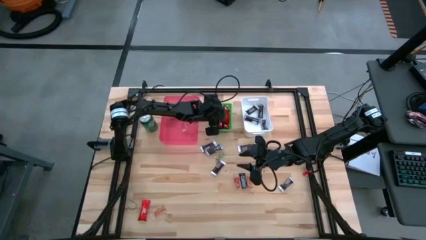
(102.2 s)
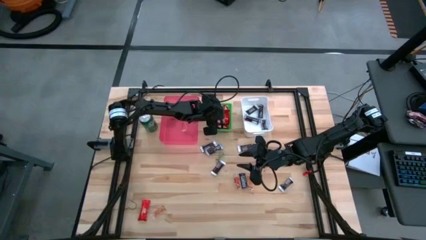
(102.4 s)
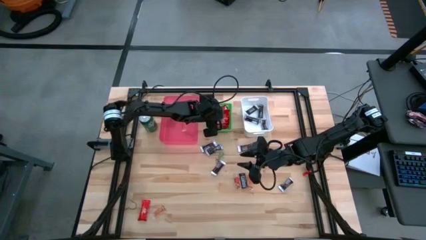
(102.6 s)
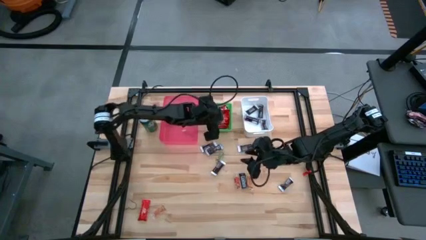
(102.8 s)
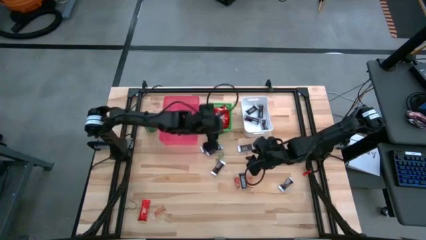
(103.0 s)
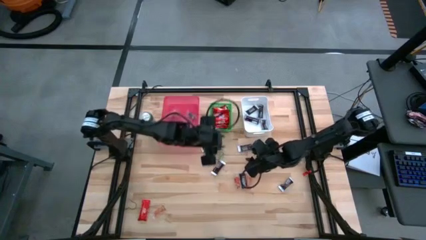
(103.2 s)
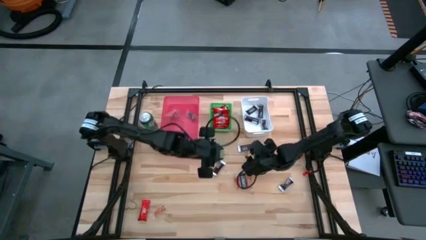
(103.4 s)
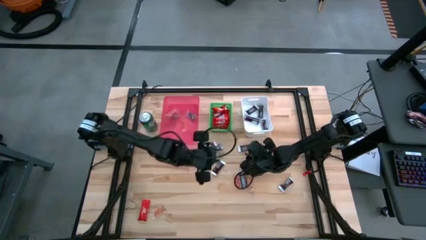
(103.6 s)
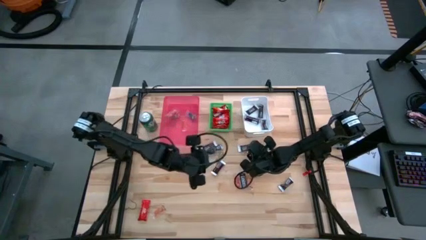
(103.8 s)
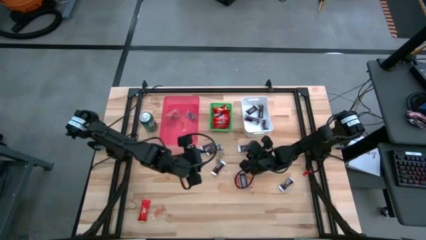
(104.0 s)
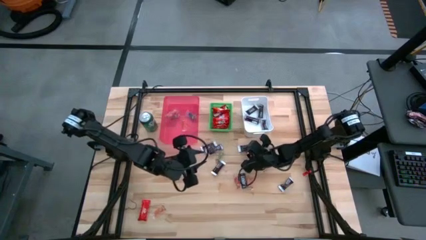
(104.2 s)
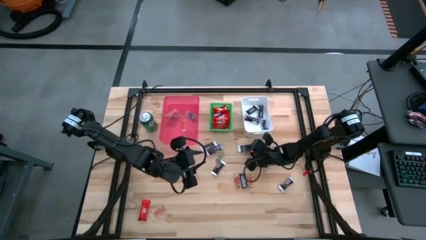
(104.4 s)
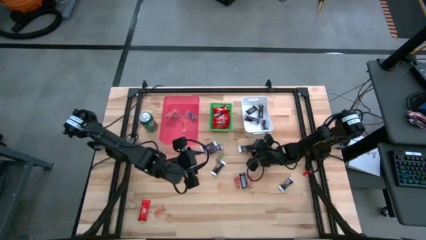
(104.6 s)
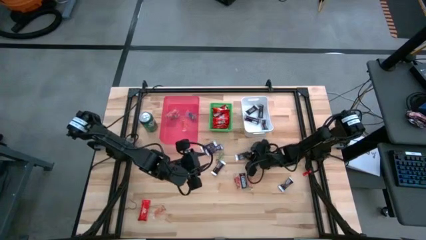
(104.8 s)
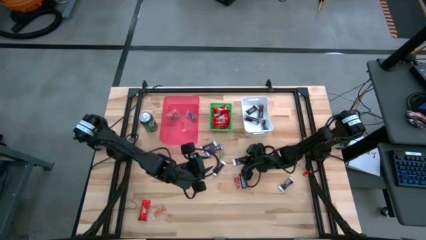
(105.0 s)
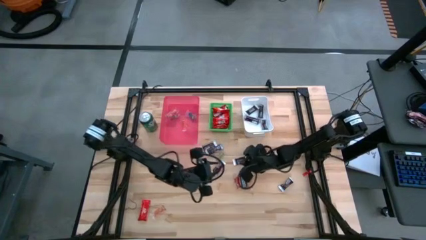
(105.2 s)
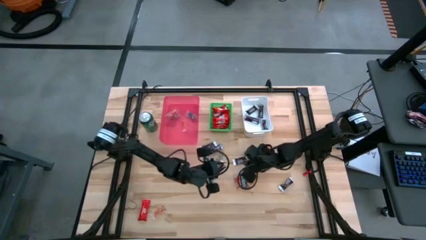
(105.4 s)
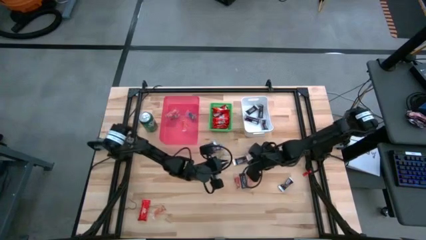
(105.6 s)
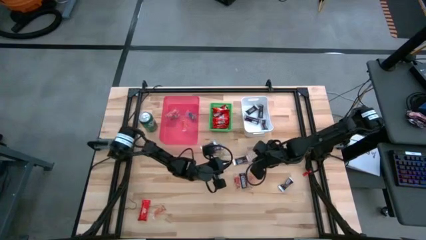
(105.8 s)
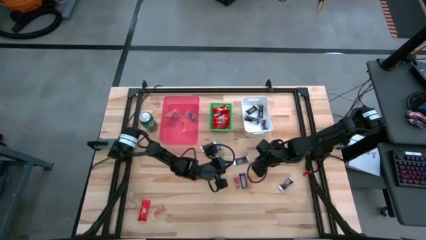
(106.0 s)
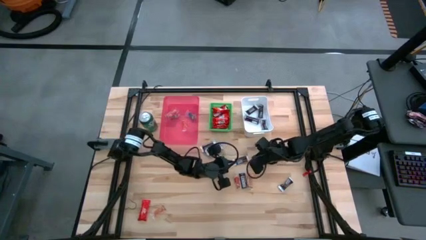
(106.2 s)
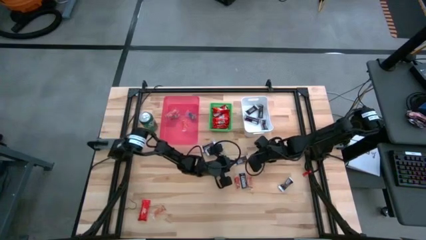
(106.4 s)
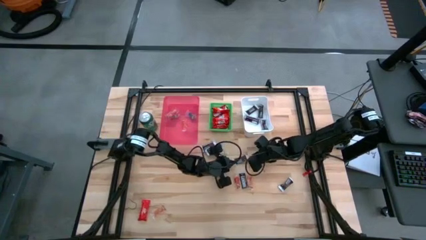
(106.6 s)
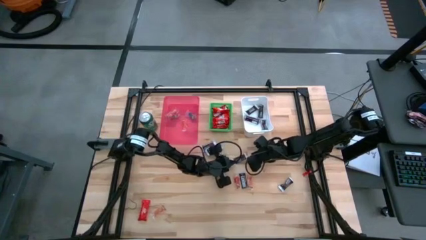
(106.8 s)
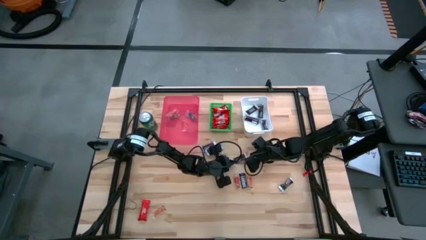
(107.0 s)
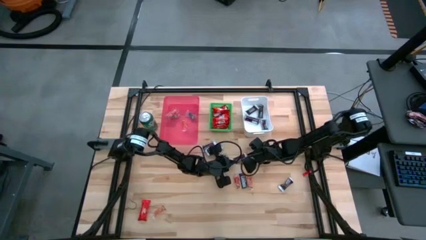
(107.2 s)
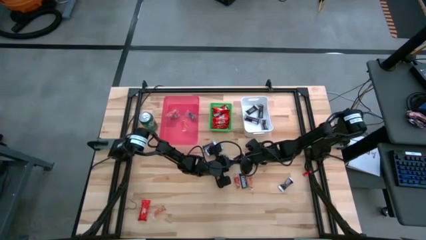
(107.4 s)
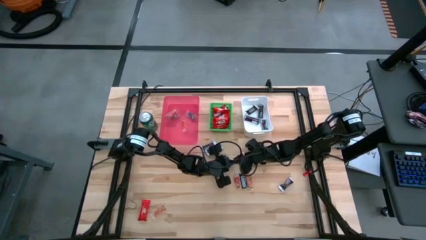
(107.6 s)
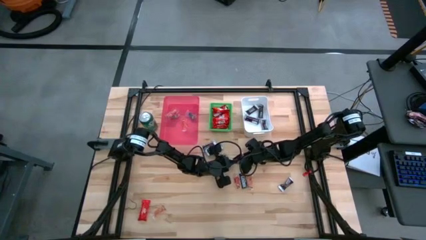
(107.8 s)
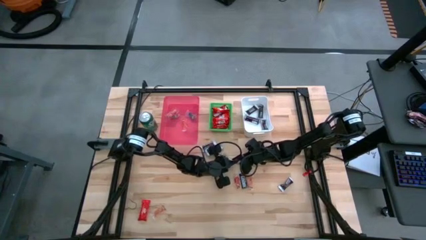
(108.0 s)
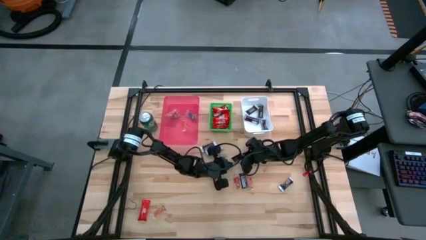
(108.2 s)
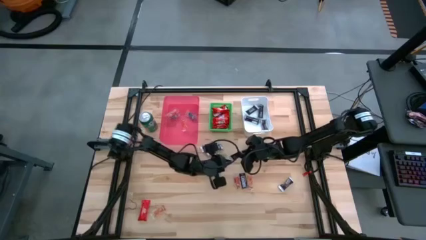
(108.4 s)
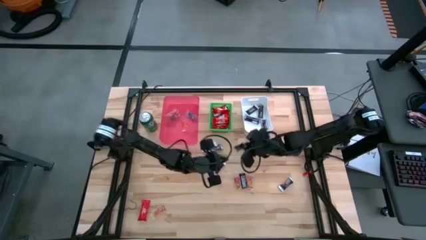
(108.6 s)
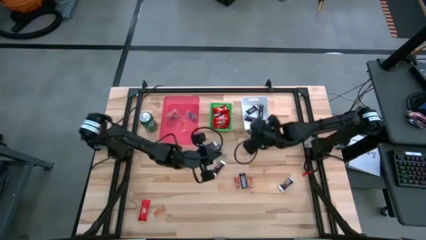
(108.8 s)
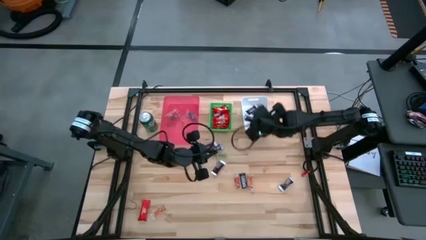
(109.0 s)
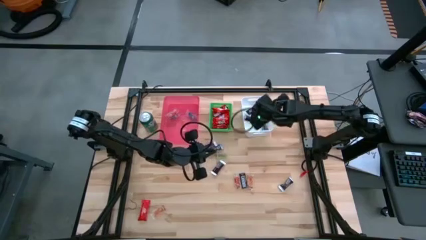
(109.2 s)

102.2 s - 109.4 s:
Task: Sort candy
Put the brown chocolate into the white bin

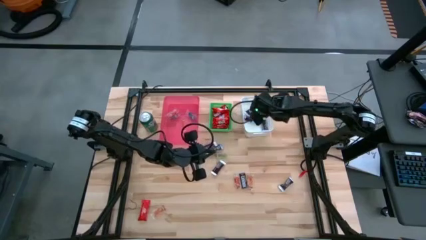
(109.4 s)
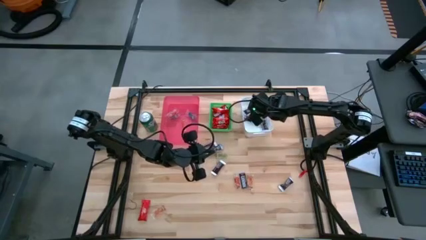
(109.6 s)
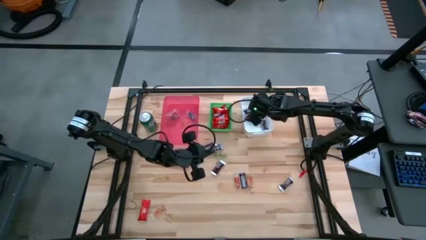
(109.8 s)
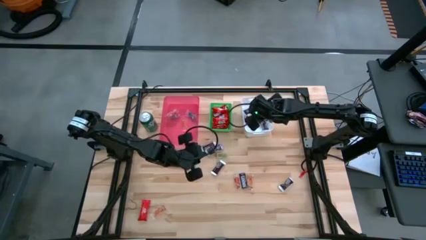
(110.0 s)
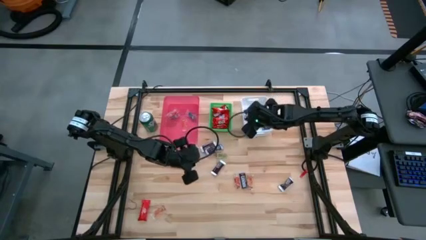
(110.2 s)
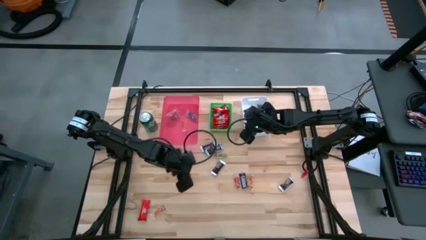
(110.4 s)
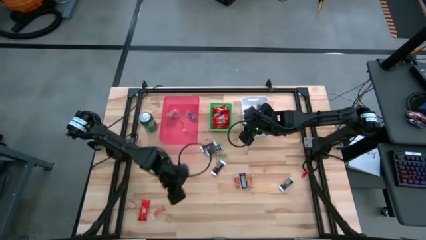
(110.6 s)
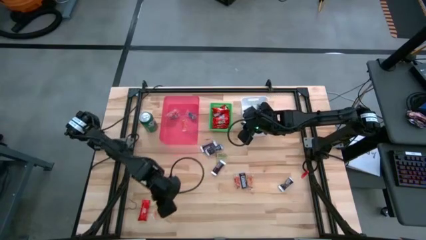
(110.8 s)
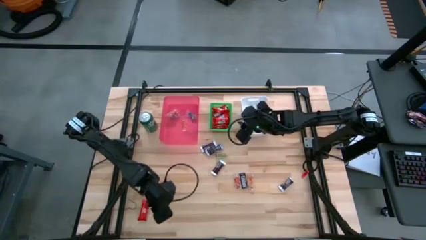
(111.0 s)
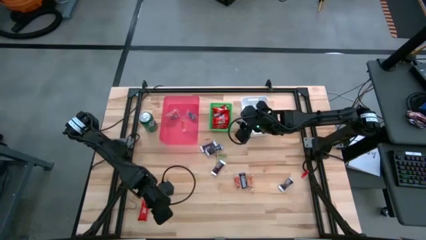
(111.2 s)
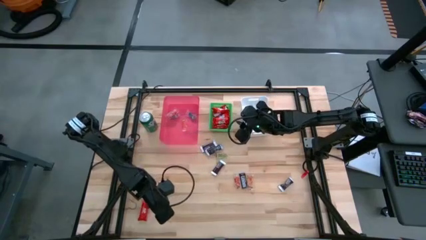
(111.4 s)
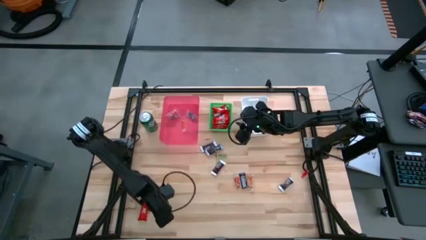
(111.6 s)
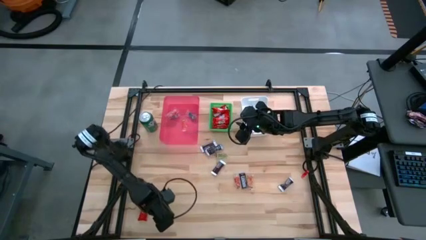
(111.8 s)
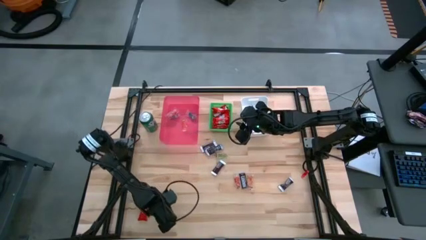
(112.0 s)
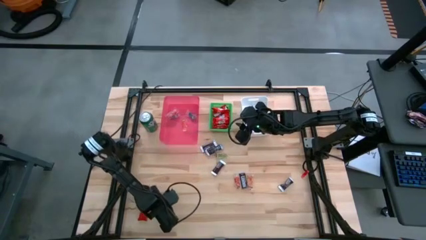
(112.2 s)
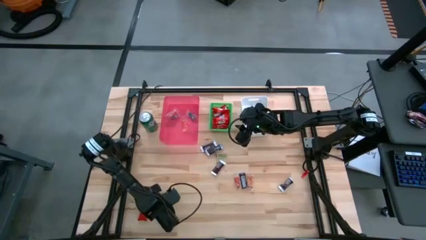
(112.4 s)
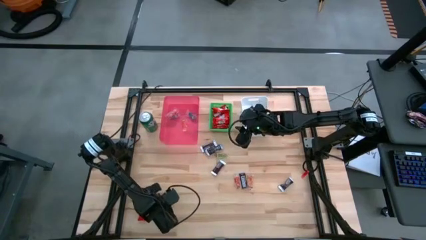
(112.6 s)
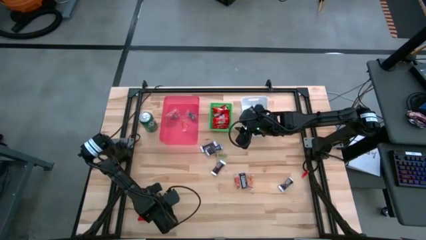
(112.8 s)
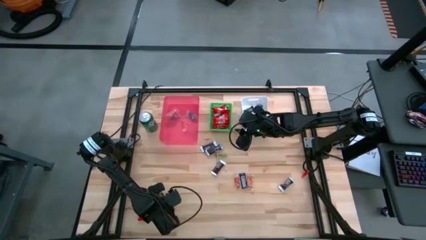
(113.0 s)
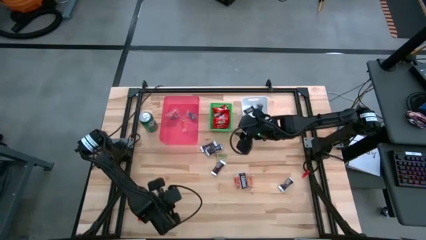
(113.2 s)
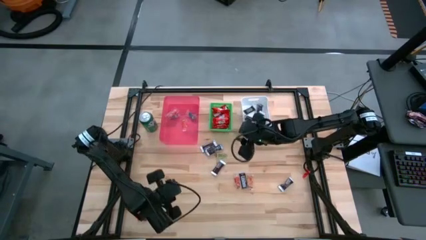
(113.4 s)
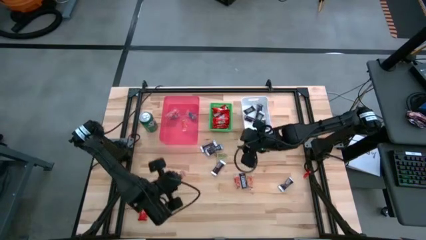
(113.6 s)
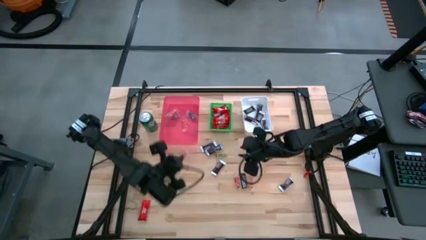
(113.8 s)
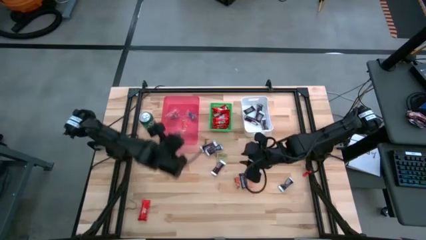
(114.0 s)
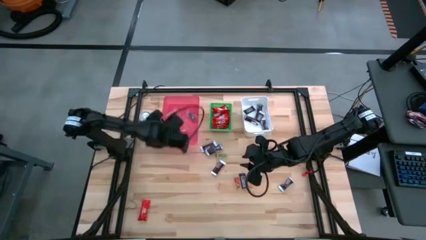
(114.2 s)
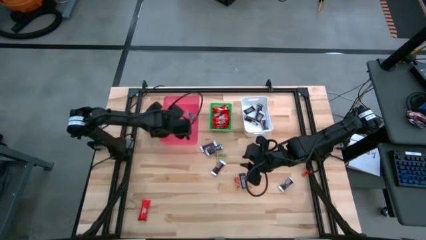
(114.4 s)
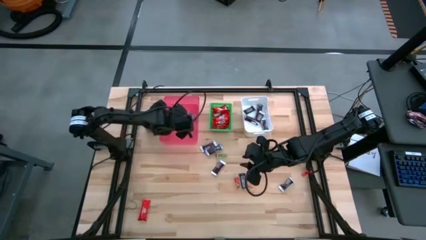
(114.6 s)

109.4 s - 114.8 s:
Put the orange gummy into the red bin

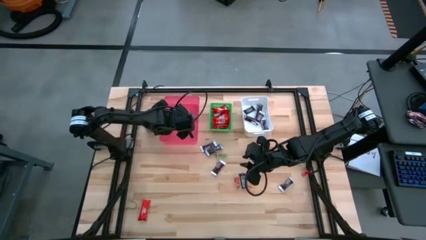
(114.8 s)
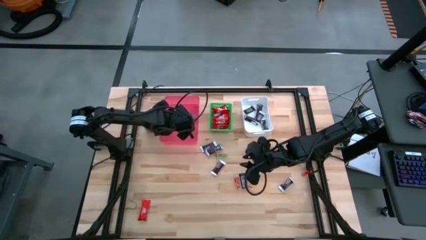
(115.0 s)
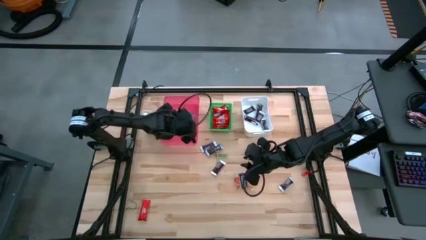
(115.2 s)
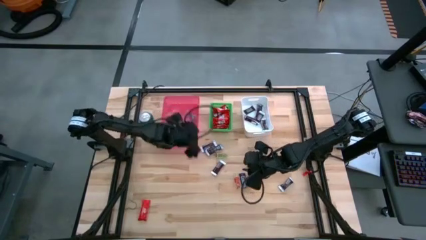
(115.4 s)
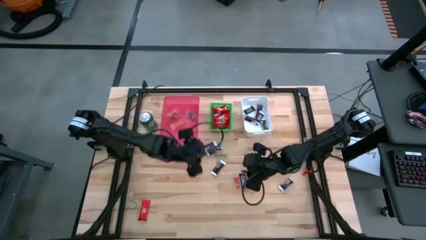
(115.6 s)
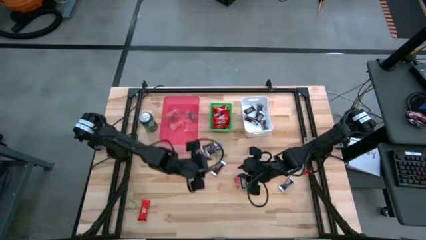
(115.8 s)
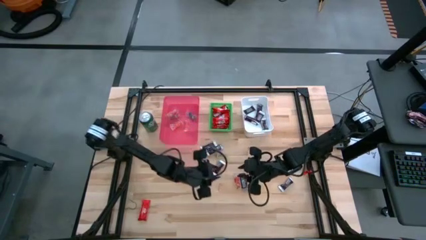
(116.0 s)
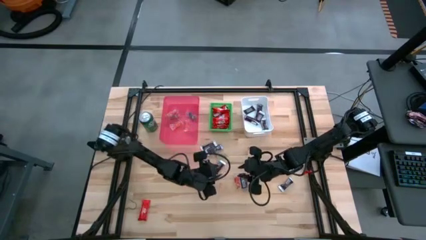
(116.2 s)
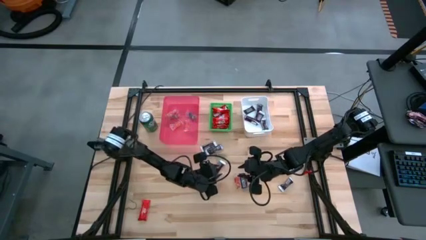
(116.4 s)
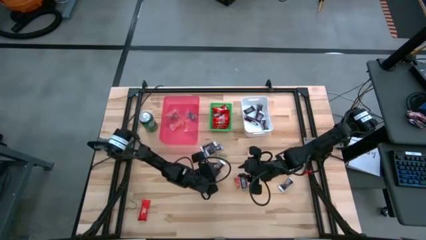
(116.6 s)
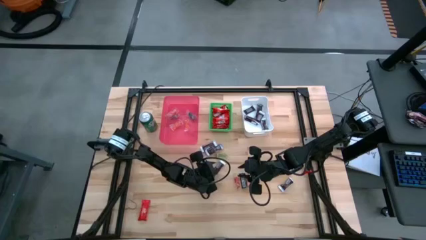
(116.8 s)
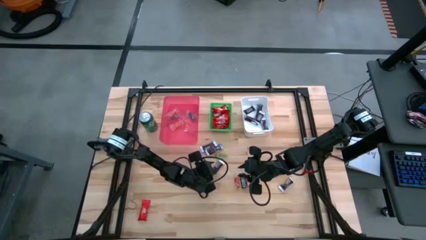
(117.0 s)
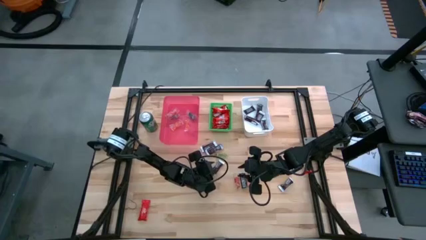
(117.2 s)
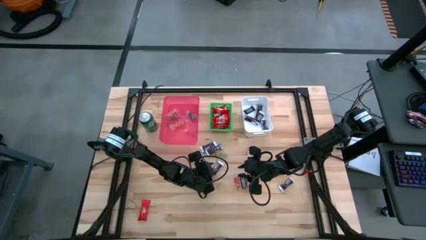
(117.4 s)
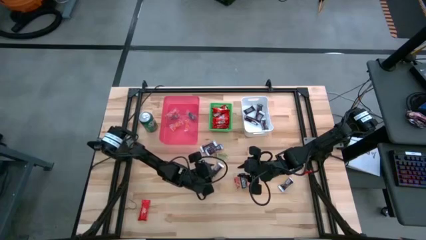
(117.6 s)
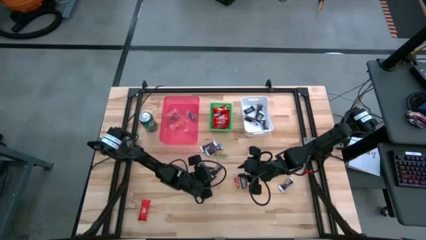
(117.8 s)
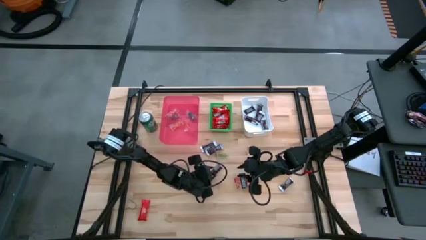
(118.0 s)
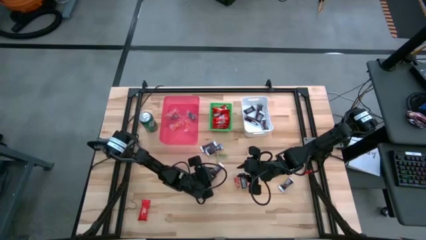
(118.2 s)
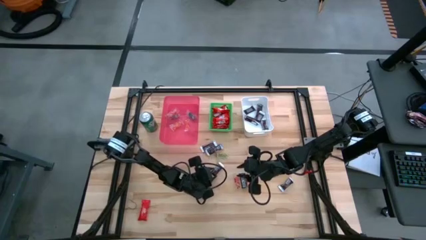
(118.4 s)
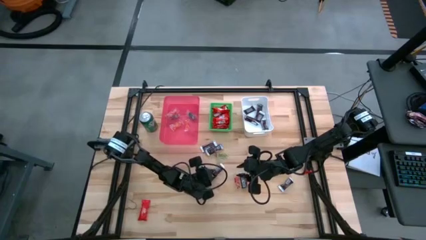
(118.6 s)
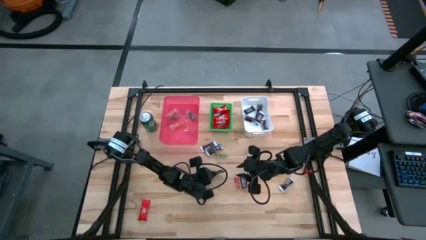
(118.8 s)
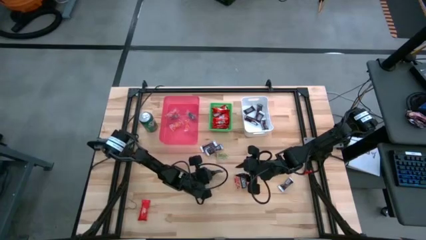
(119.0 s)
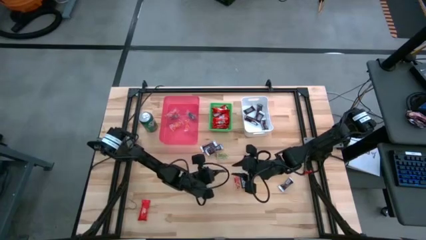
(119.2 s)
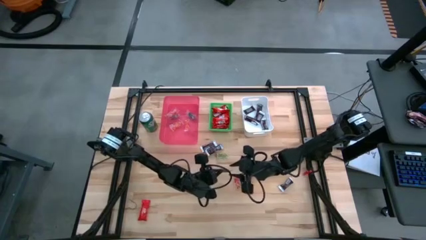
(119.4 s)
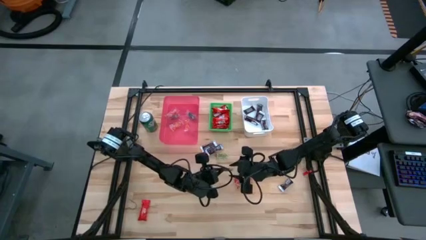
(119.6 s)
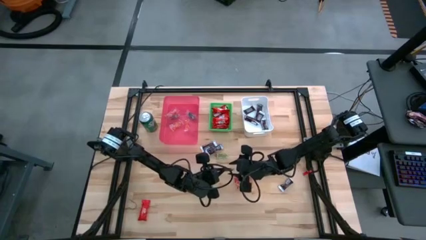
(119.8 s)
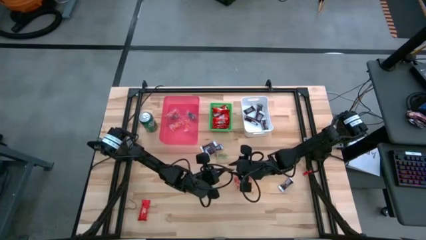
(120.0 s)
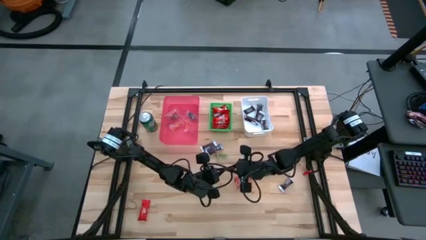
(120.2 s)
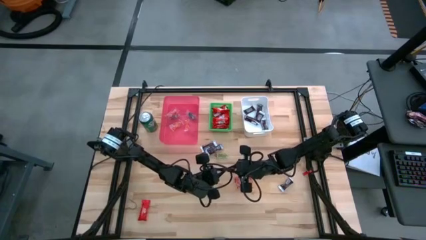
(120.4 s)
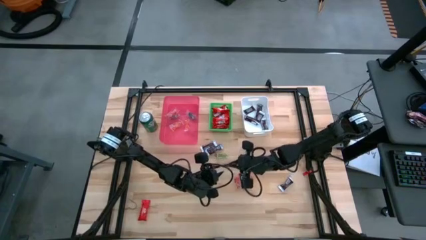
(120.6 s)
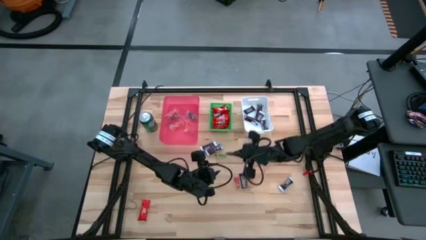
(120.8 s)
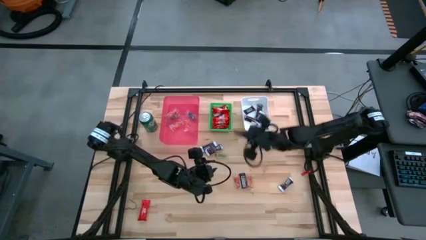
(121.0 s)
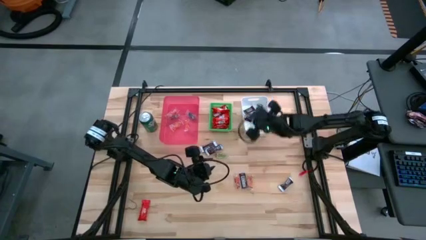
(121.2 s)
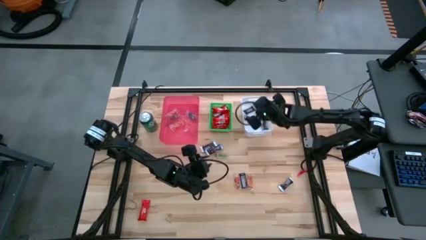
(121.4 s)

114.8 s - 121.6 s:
Put the brown chocolate into the white bin
